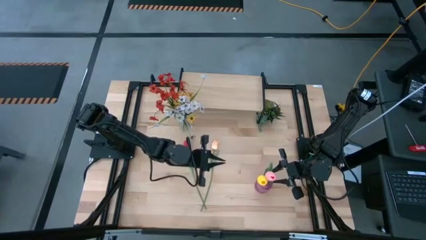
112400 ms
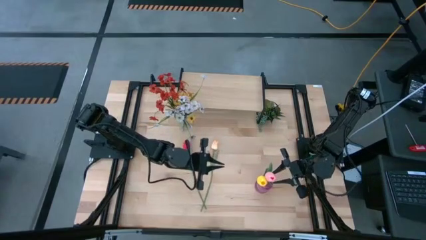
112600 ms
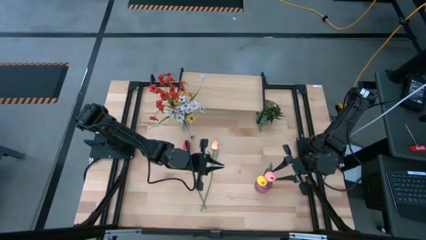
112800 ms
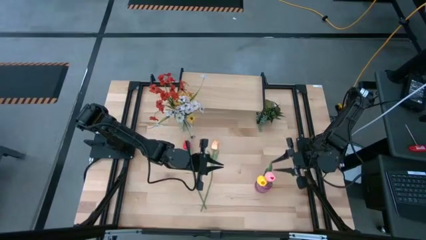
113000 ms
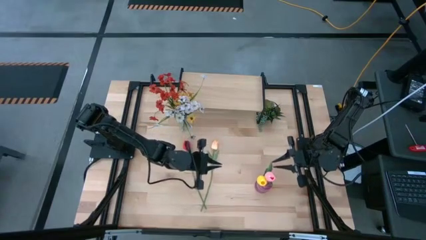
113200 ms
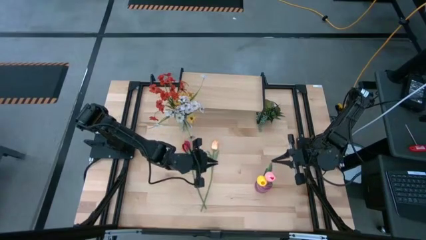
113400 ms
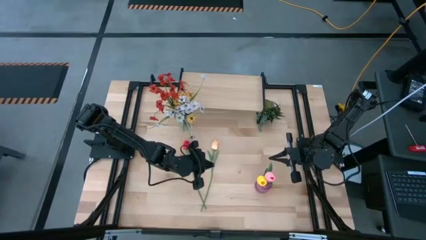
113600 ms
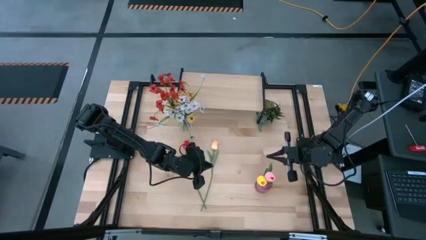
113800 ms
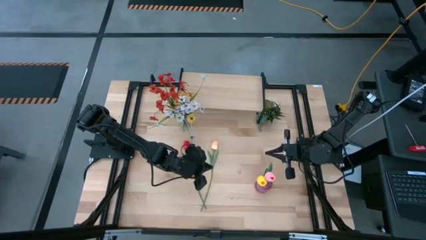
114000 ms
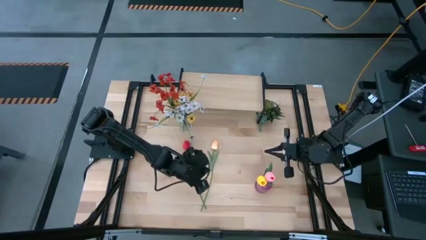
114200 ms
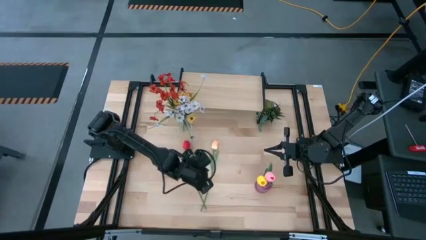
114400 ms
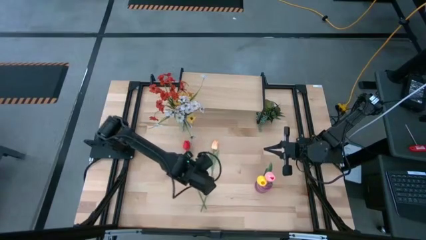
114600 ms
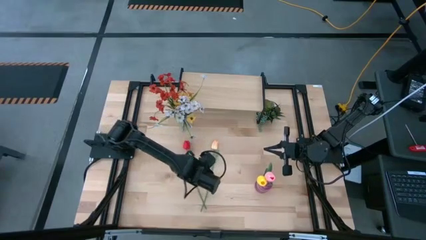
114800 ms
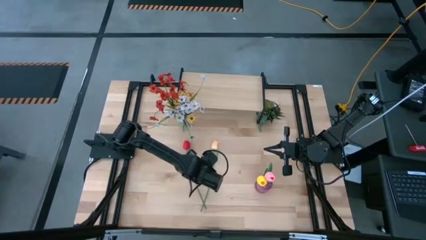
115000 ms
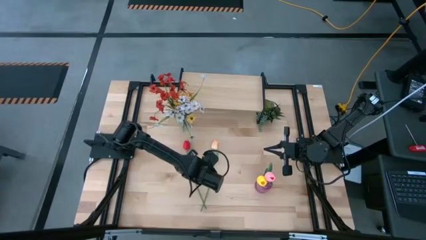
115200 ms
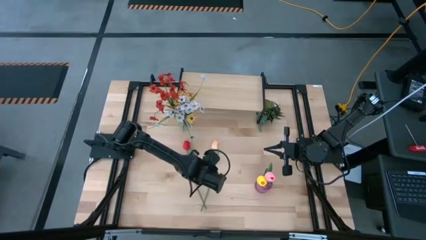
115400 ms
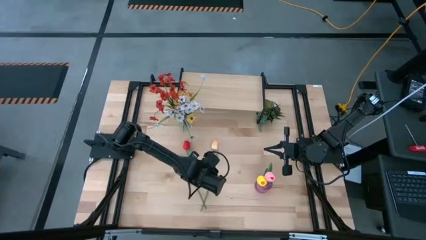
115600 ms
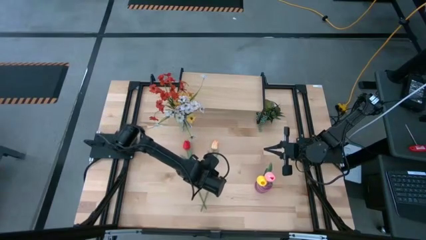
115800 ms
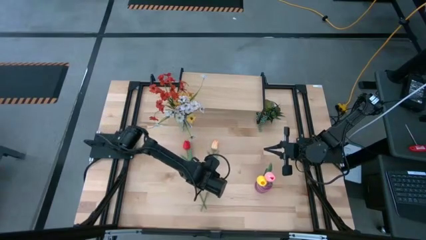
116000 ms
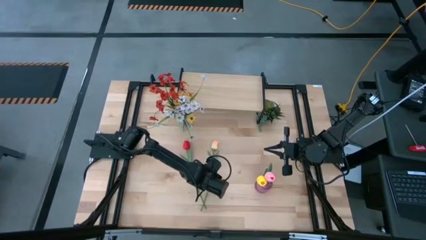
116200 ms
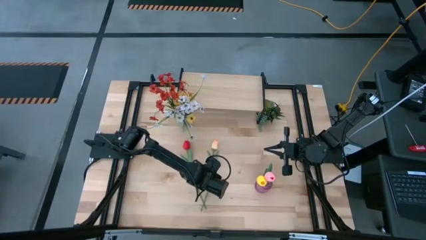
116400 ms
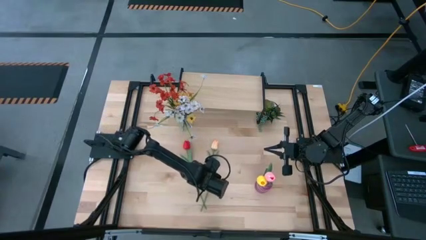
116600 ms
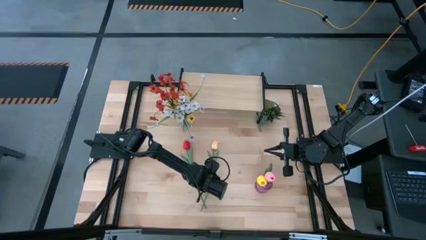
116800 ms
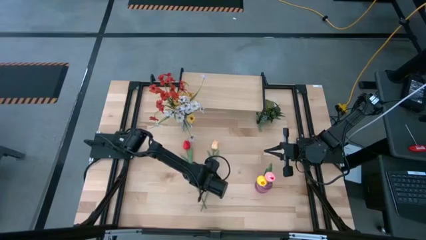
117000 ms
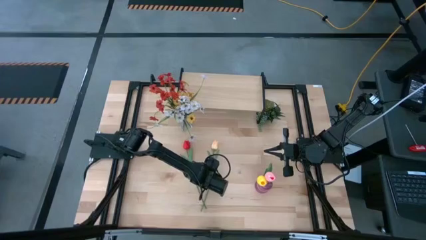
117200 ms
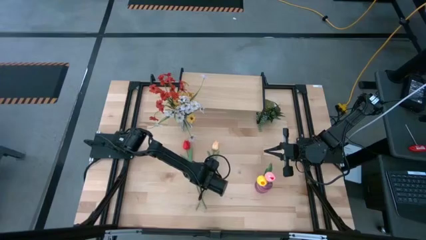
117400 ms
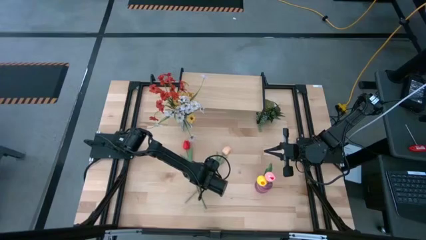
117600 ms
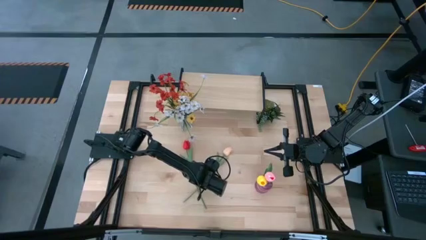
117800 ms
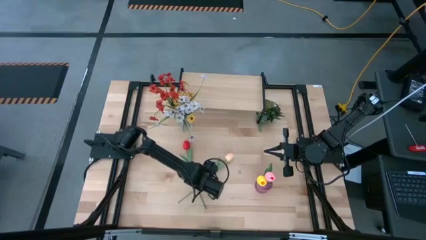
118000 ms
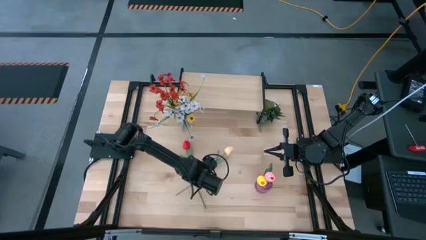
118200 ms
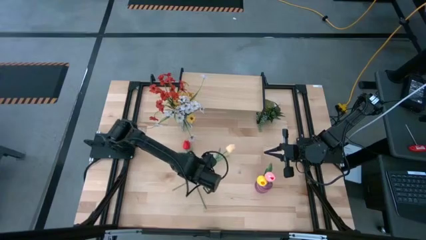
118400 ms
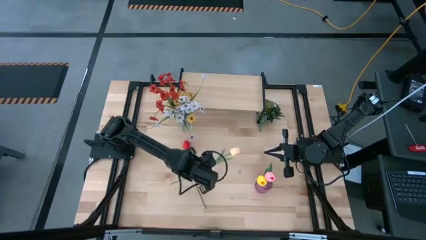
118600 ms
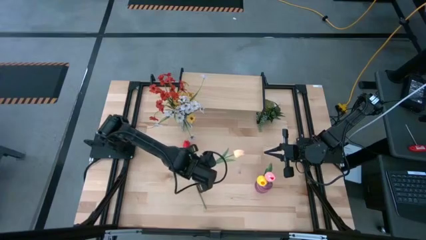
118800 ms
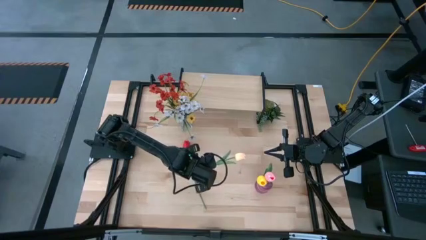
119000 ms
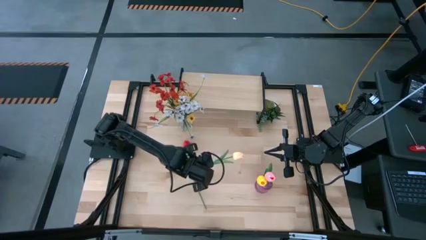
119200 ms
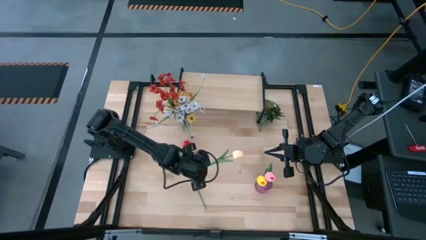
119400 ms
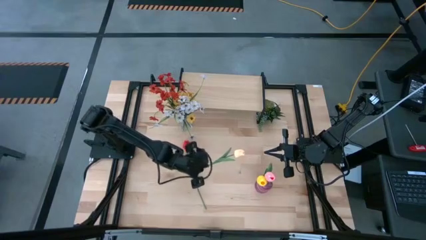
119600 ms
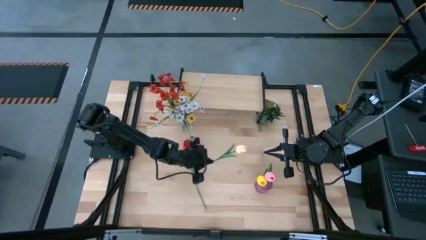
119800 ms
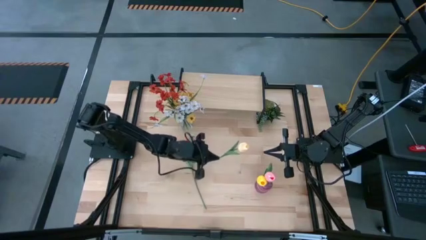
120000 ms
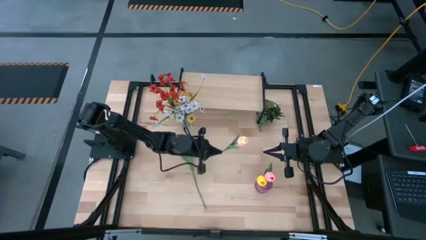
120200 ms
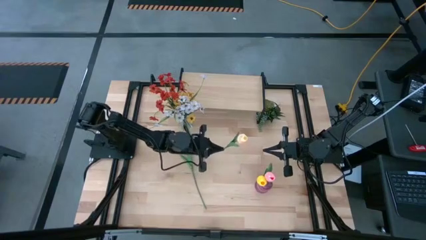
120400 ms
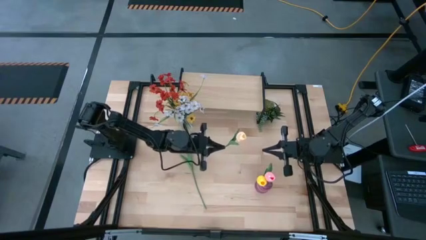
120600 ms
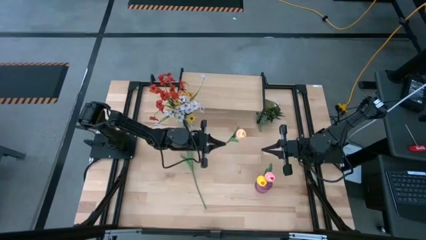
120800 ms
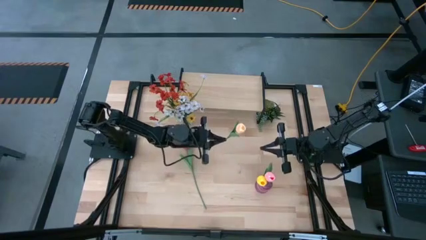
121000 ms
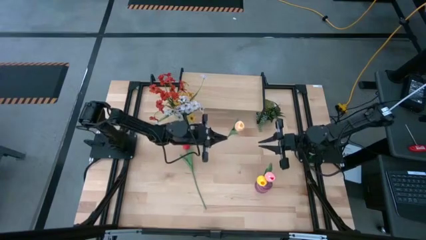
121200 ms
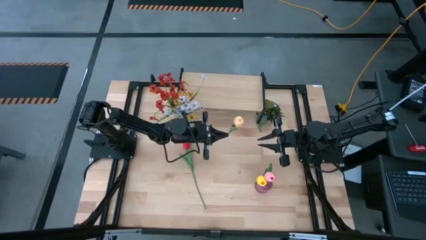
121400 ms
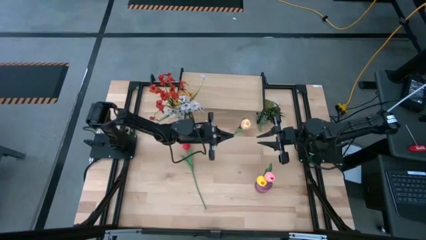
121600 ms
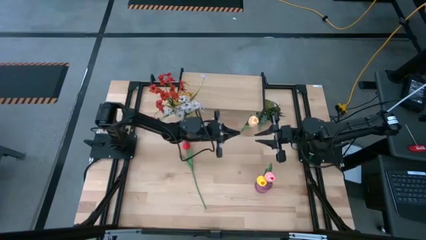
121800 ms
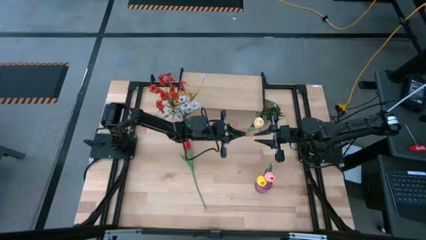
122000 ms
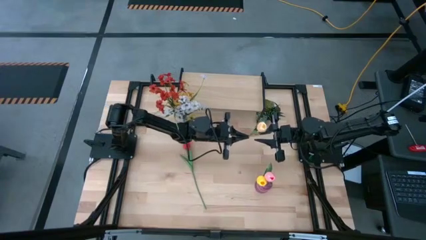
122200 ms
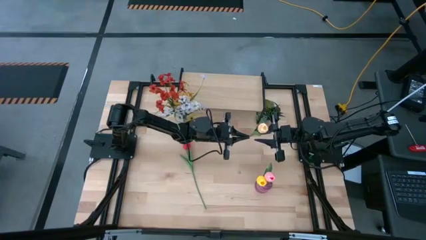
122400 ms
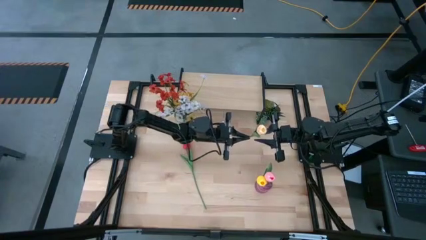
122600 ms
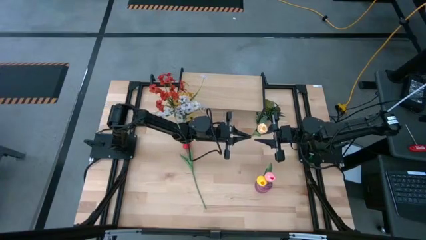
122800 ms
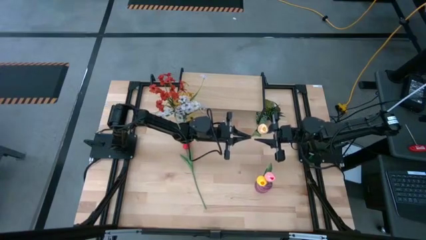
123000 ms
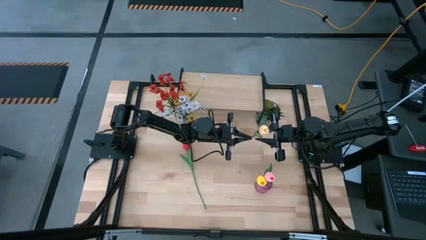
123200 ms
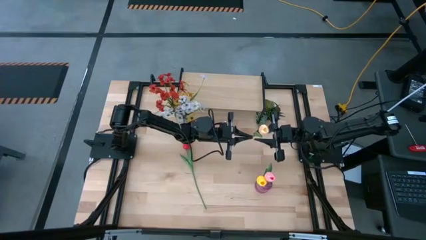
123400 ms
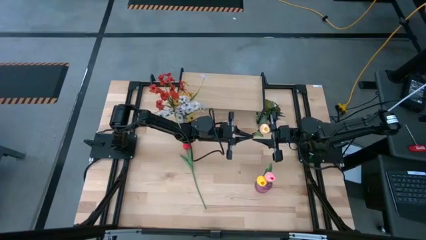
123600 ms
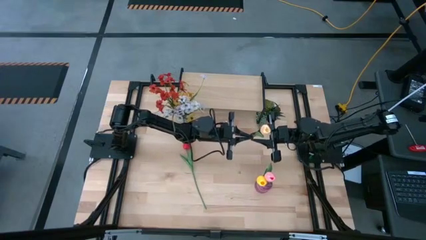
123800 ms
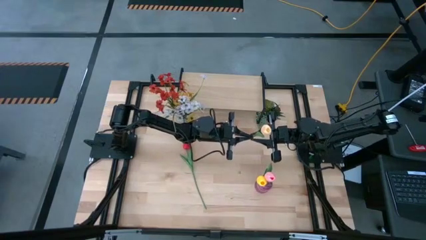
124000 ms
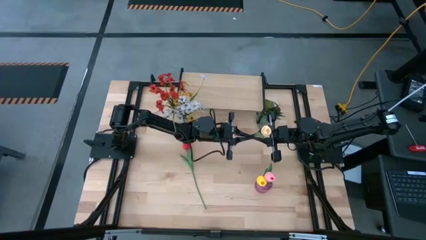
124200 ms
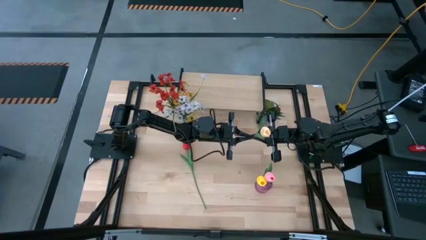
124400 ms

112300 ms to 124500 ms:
Task: Pick and place flowers into a vace then onto a shelf
Put the white flower into the purple vase
